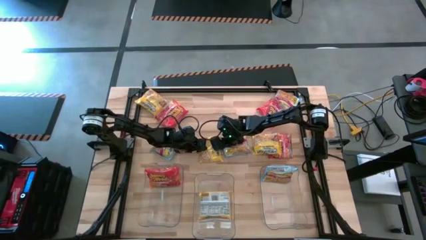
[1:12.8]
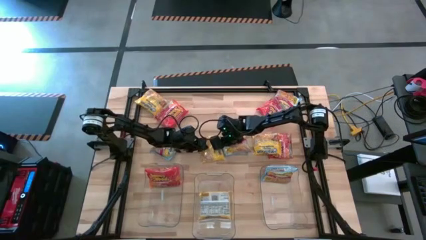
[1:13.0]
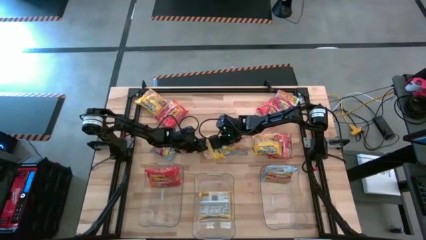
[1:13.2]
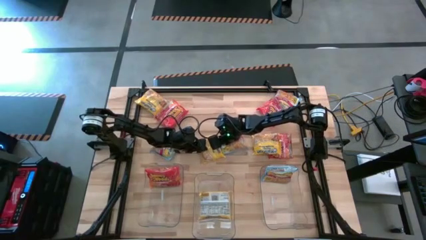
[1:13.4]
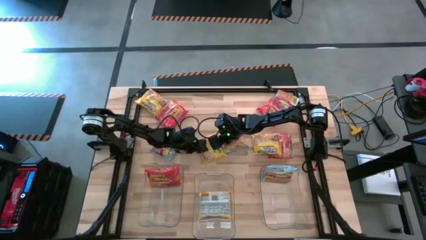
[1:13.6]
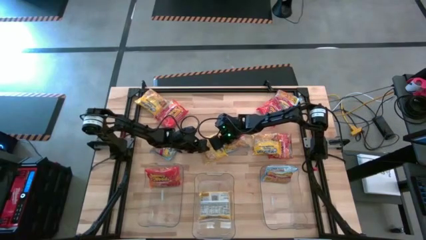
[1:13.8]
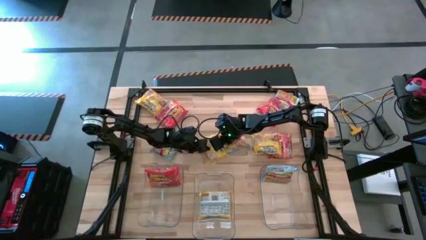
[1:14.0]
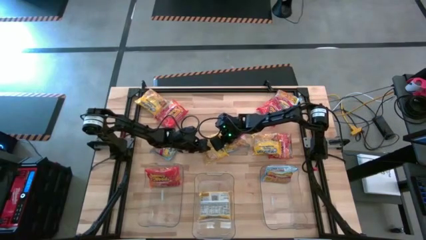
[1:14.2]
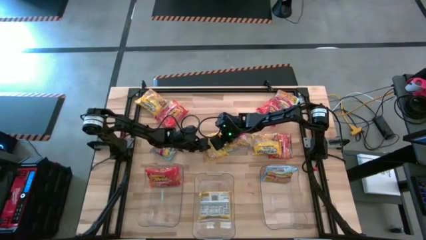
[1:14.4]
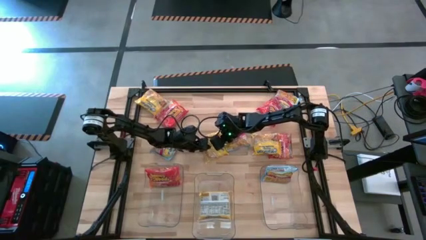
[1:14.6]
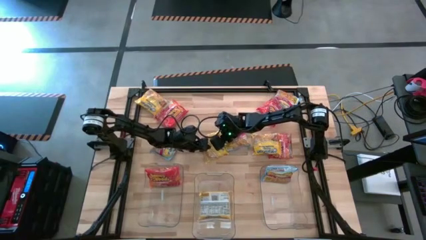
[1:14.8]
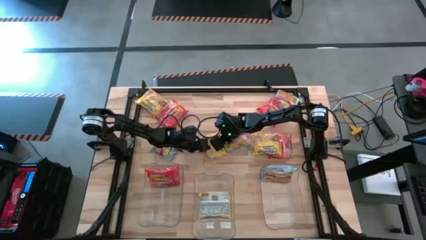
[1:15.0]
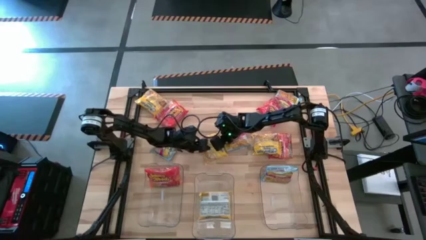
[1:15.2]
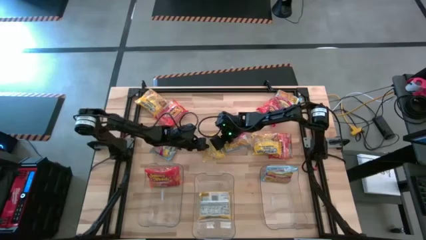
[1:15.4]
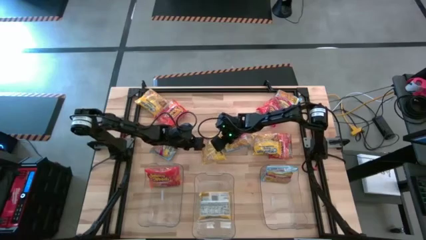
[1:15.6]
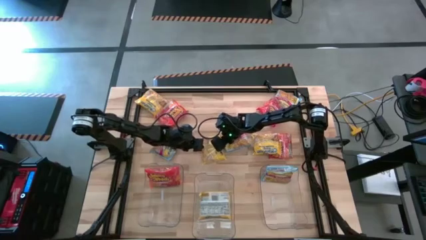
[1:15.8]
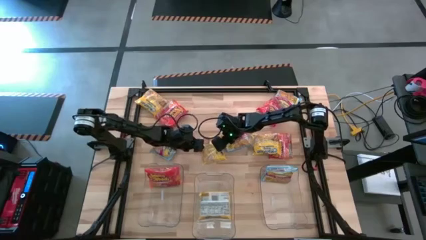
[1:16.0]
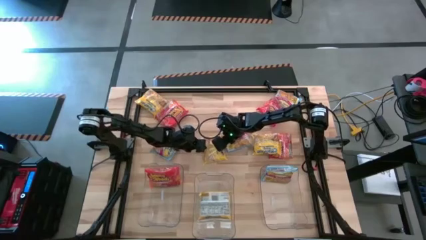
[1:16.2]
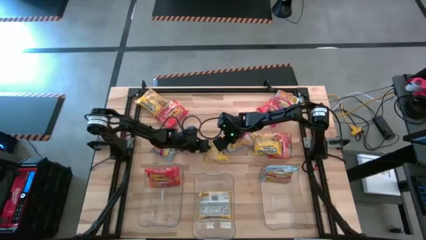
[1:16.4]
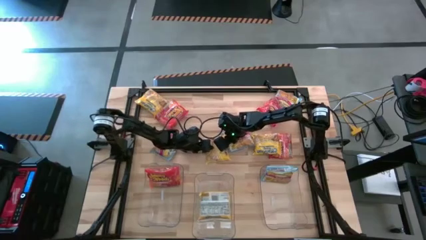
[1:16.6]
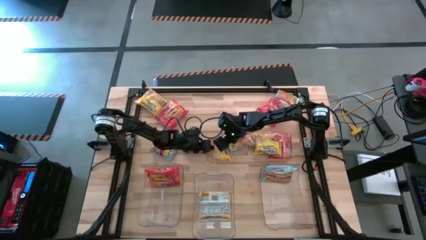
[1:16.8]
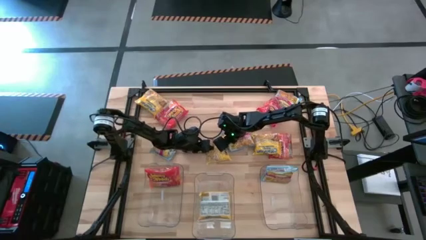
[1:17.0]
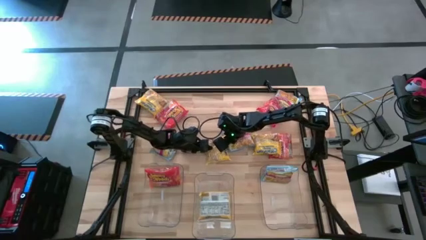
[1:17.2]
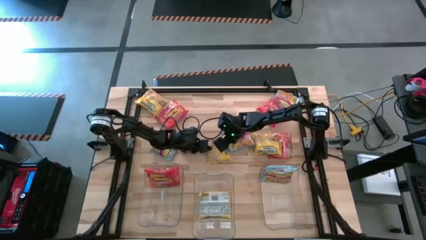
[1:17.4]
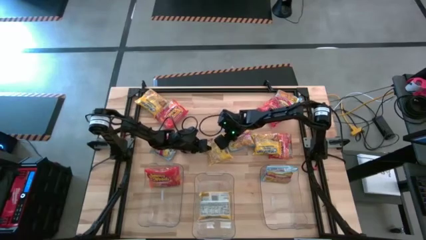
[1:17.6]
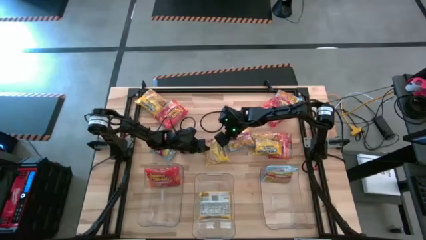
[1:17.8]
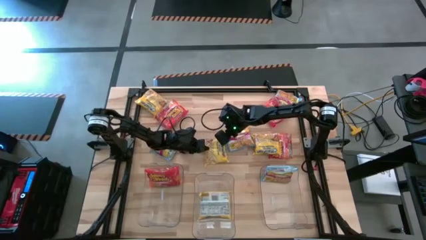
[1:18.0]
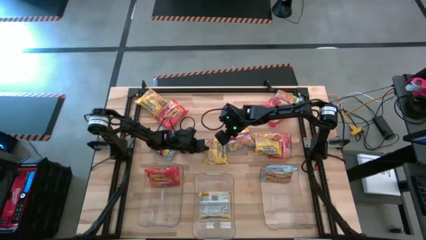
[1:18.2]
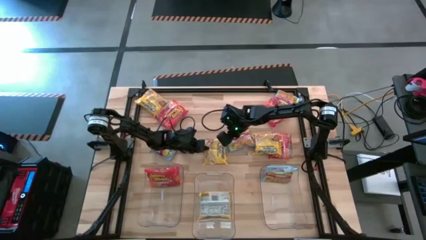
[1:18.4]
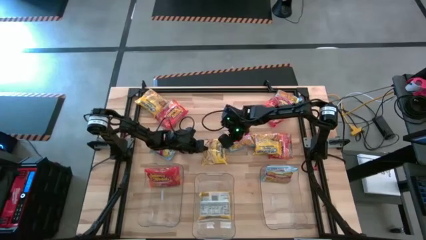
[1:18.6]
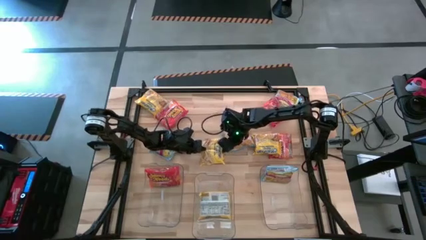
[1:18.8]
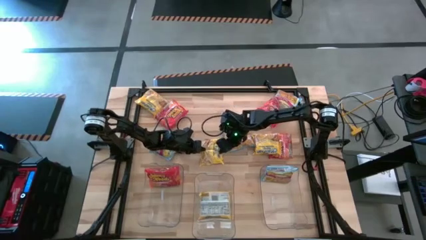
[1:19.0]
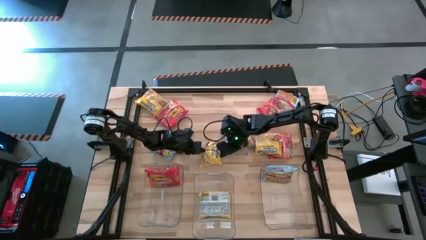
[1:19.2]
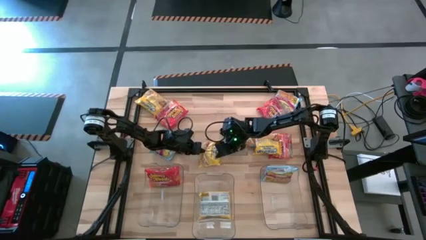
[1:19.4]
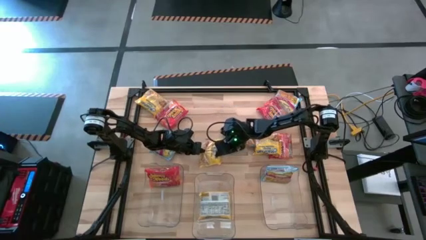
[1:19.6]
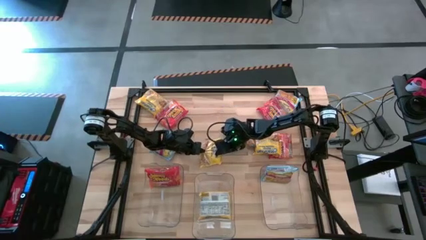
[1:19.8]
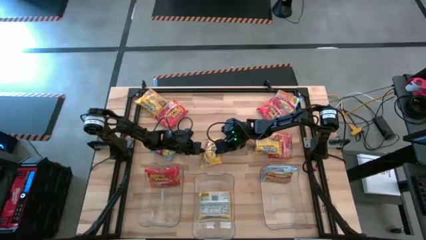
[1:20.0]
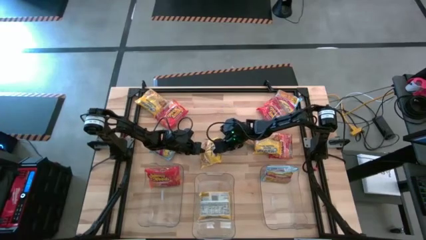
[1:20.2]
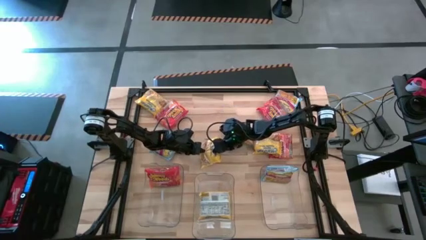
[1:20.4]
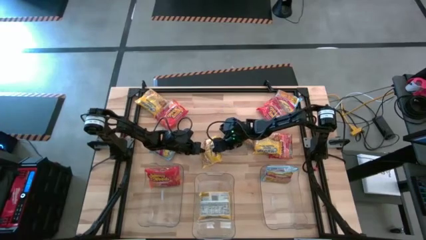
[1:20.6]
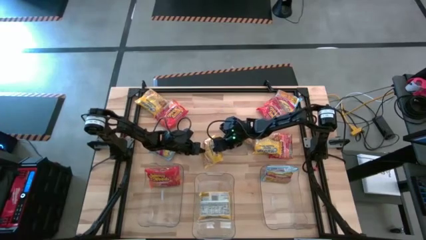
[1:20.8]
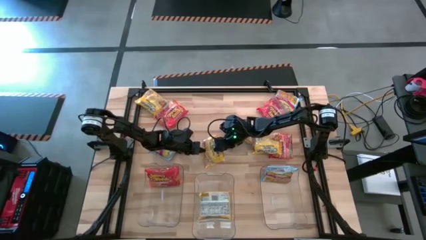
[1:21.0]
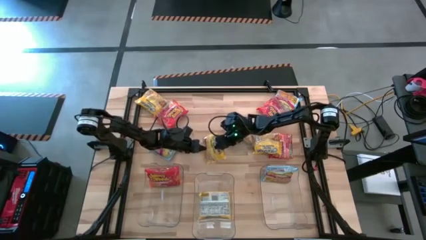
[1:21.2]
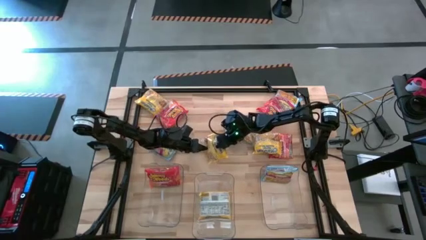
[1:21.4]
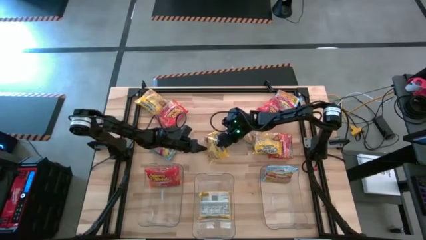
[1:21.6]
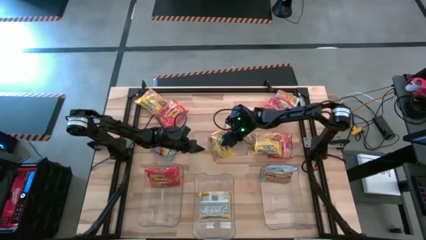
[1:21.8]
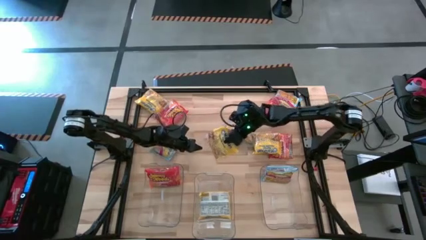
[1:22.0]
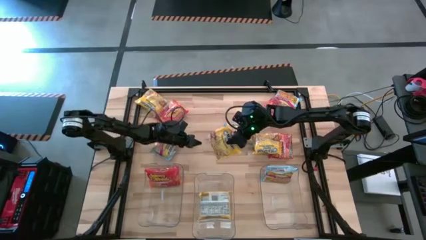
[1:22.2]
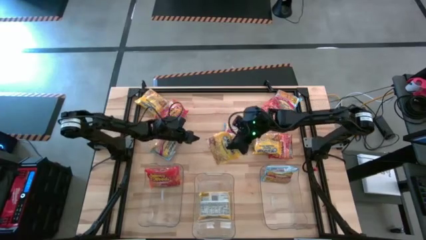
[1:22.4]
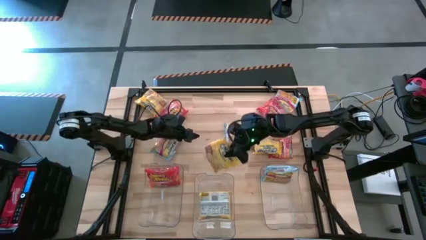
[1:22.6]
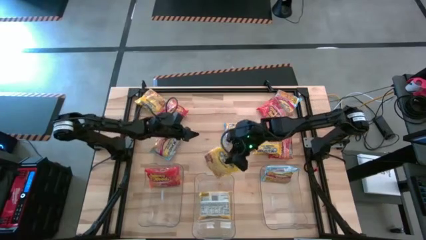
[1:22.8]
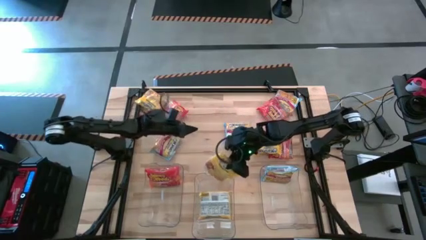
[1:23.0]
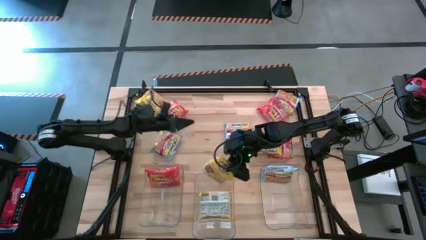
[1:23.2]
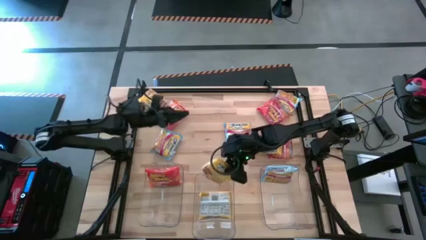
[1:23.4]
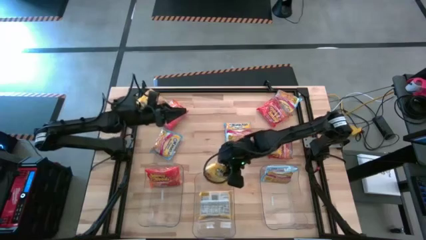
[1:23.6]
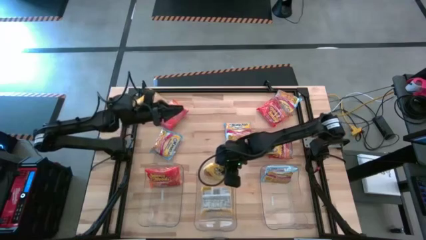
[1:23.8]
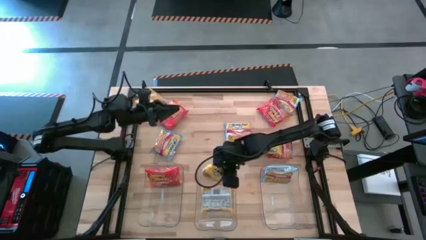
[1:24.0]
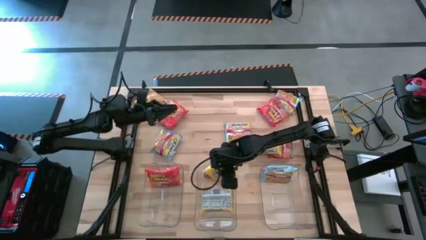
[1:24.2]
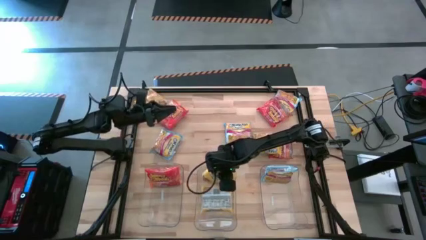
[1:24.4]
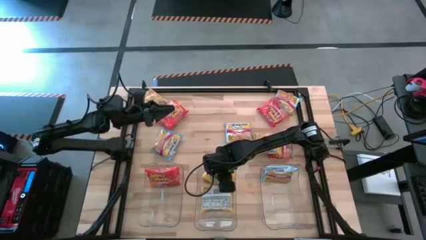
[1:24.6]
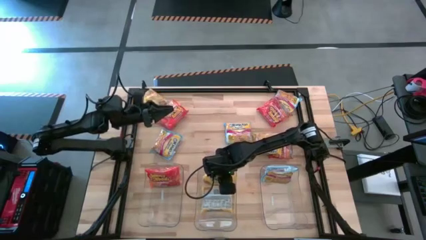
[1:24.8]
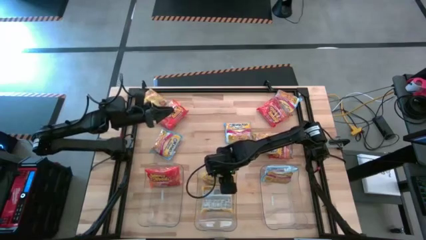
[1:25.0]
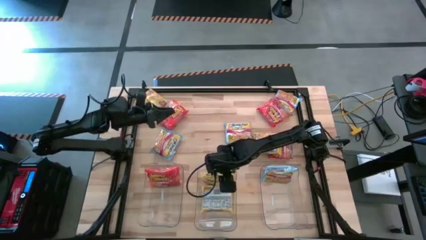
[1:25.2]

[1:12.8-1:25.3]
Task: Sort Maruchan noodles
Put the yellow noodle pack into the middle transparent bin
